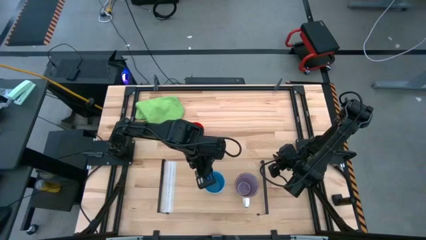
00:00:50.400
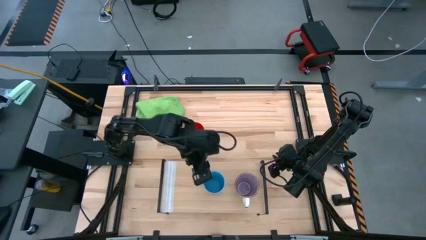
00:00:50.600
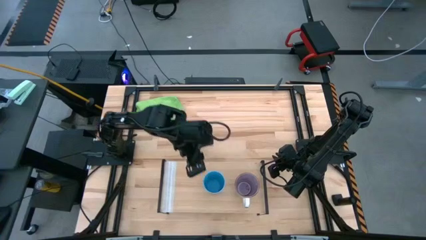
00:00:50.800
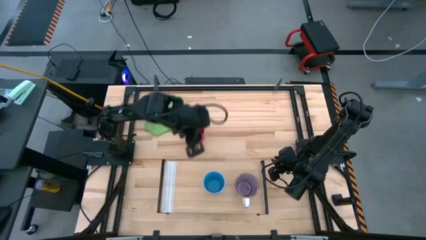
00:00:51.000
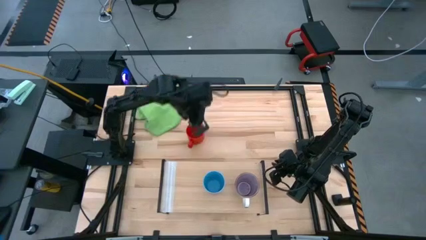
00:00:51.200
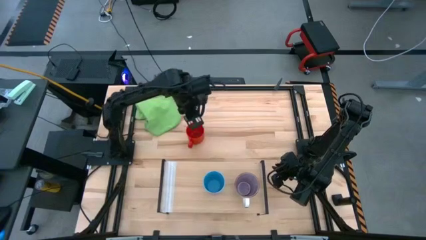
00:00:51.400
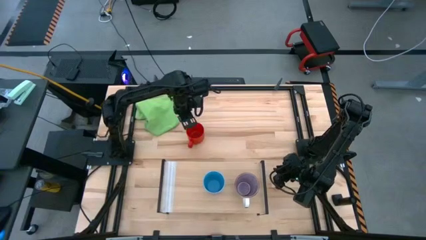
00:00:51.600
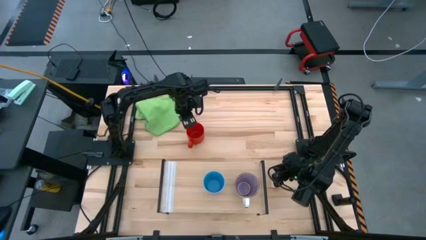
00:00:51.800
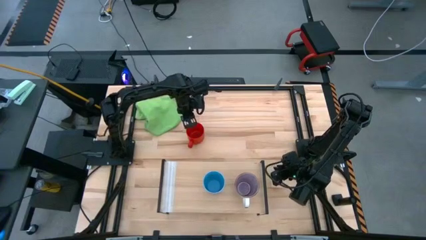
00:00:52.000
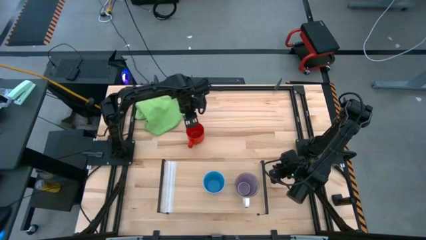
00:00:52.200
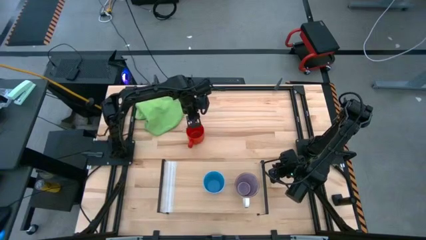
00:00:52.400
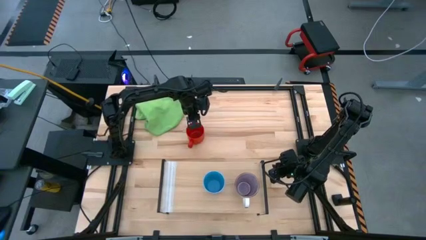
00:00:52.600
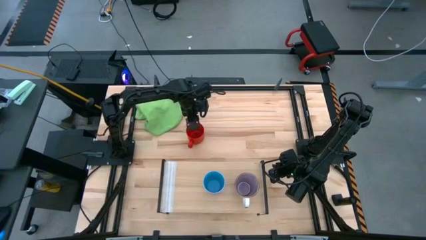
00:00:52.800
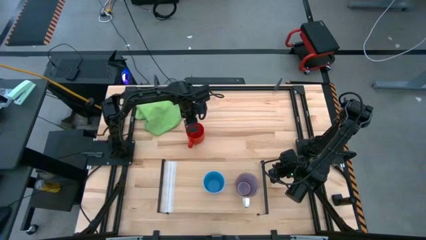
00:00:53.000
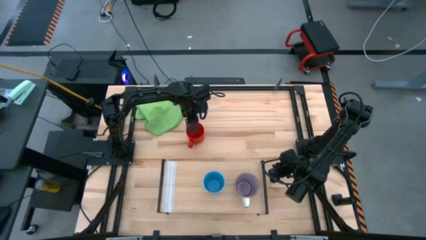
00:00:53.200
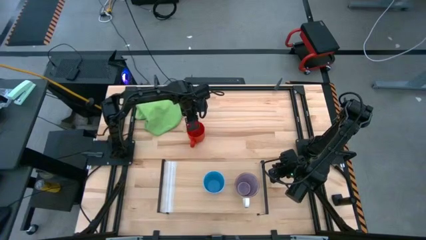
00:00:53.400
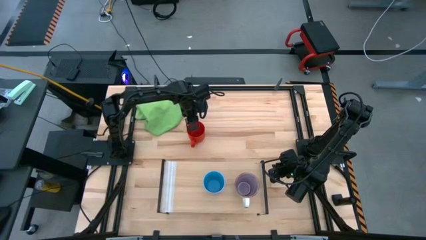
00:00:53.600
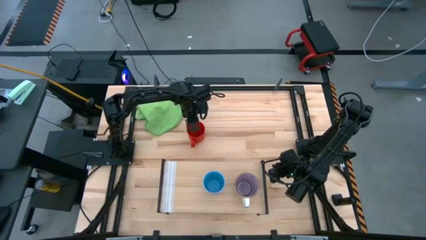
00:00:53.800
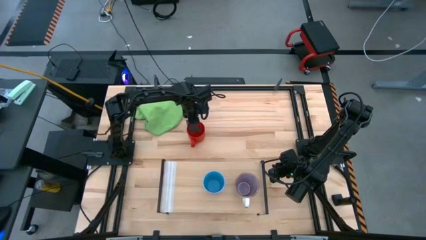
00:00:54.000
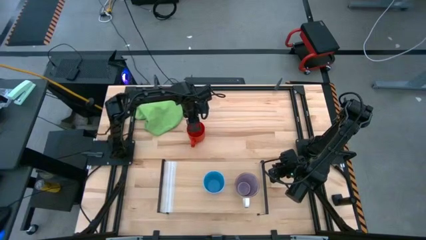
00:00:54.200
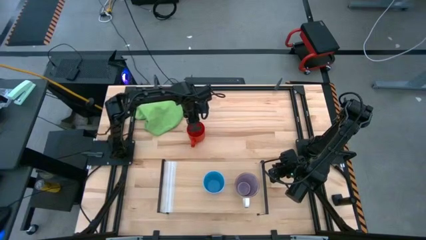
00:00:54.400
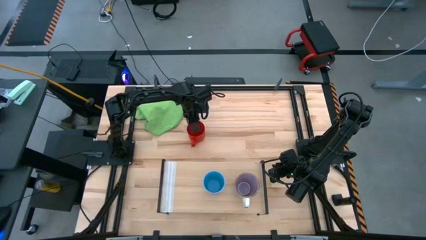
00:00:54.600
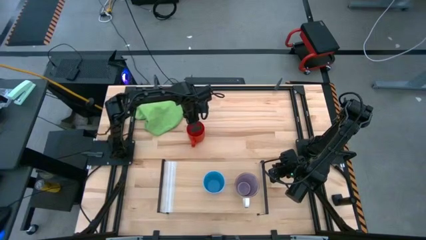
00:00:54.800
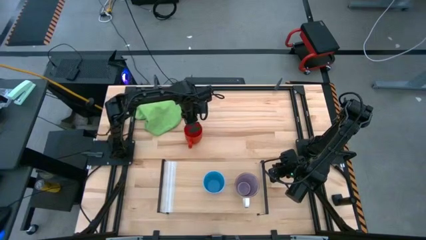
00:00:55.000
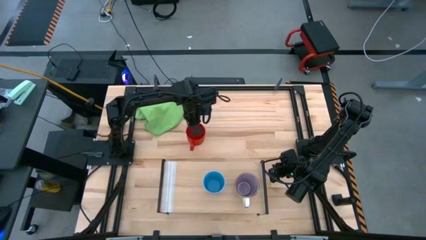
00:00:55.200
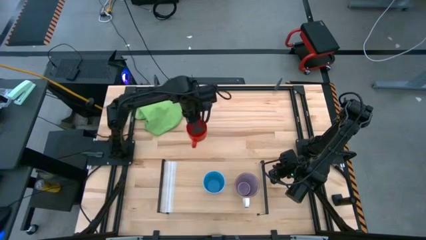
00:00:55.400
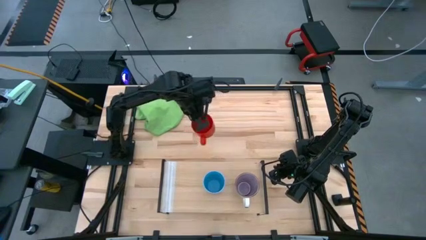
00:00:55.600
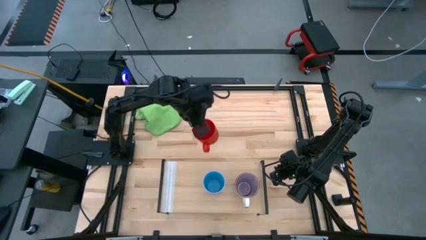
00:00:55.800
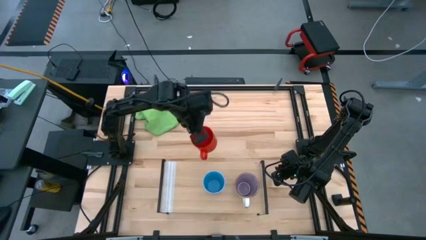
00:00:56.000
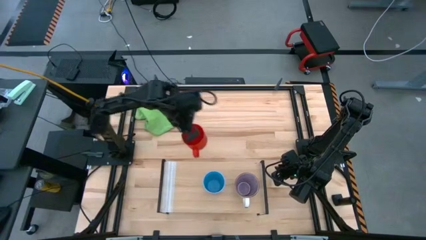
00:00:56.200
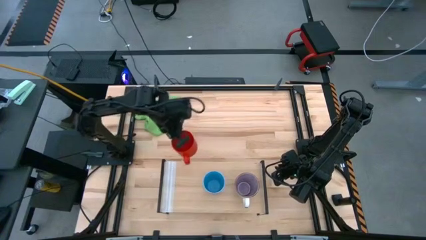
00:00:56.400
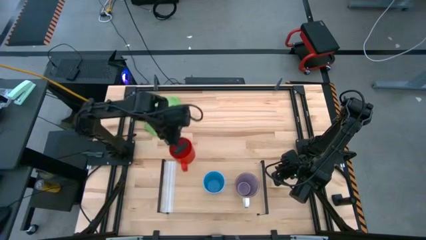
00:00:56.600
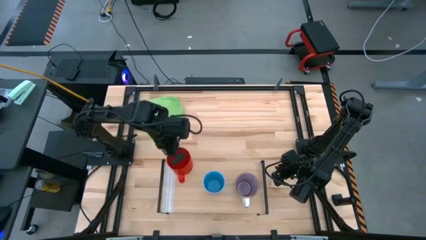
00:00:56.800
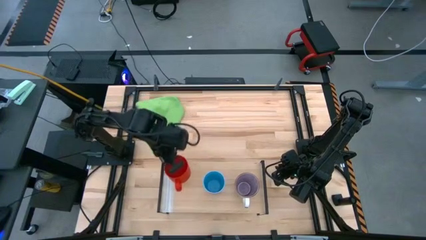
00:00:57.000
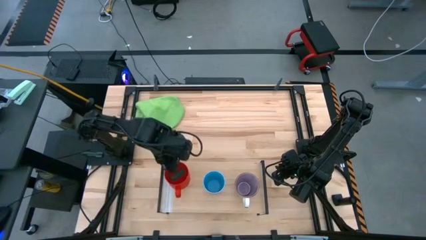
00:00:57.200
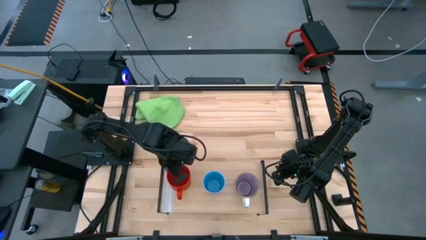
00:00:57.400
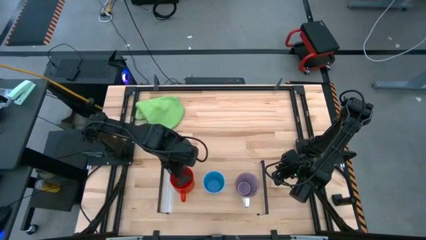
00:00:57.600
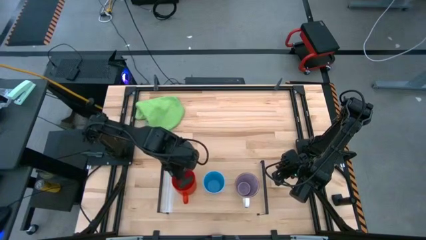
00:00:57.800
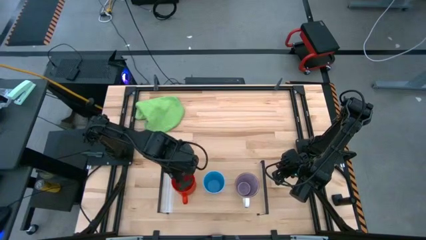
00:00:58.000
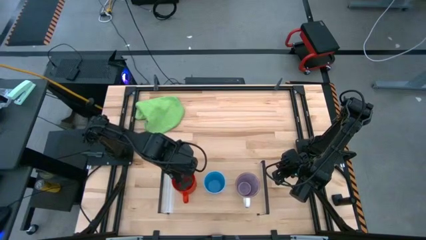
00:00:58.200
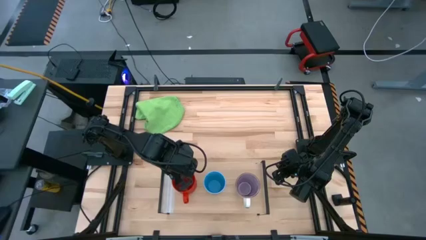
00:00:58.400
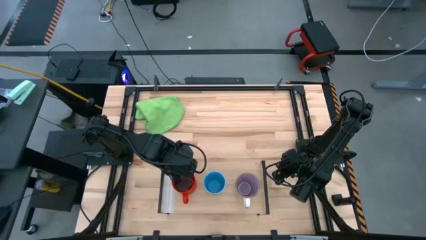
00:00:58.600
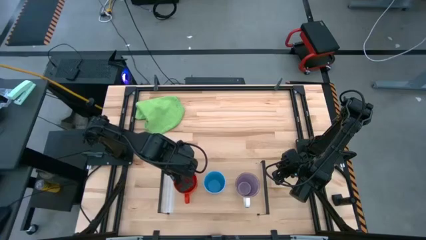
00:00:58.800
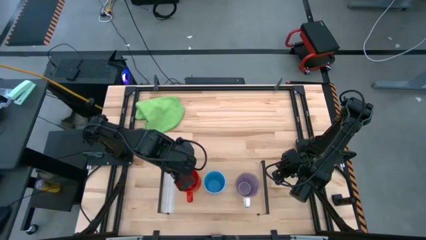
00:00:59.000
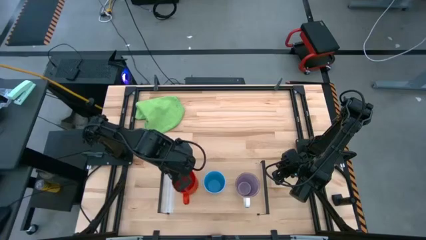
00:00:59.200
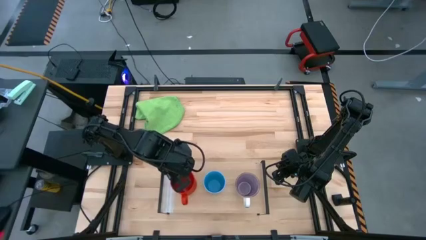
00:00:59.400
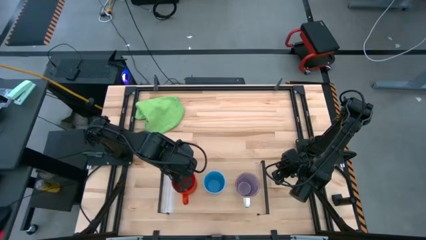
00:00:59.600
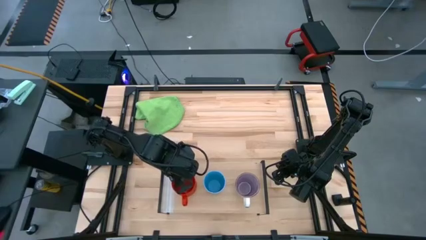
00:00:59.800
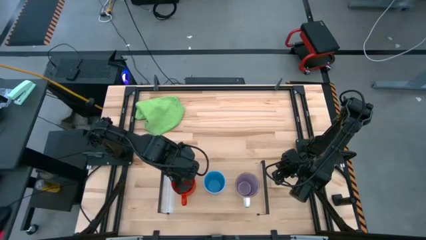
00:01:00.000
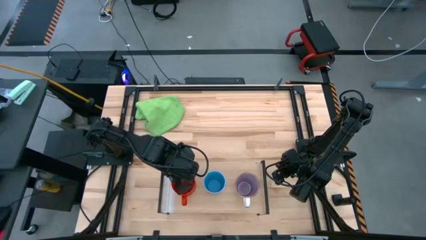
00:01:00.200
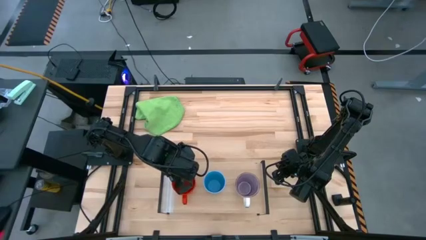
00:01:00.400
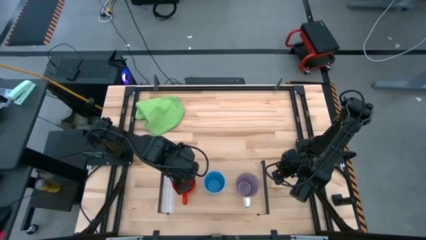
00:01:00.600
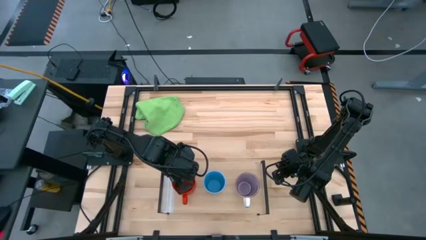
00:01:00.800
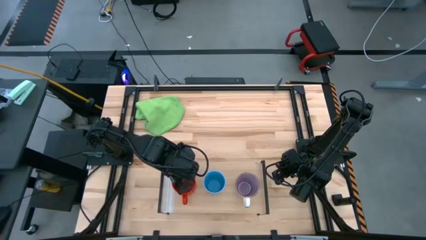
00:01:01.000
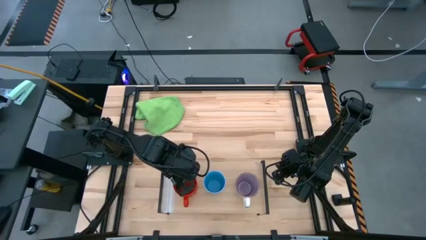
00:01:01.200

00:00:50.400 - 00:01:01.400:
Task: Stack small to large cups/mugs on shelf
Put the orange mug on the shelf

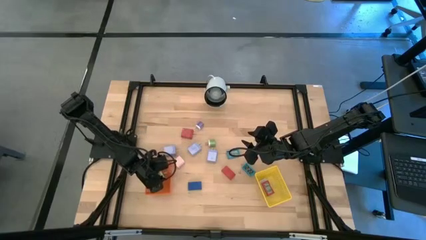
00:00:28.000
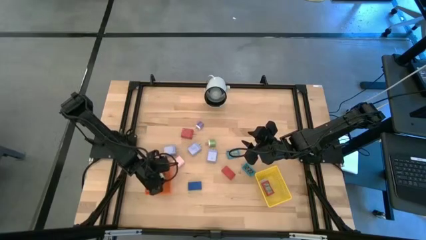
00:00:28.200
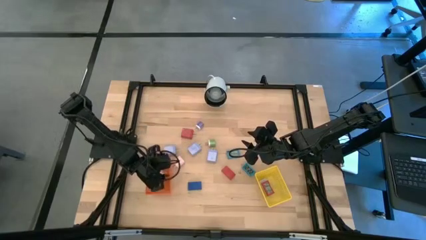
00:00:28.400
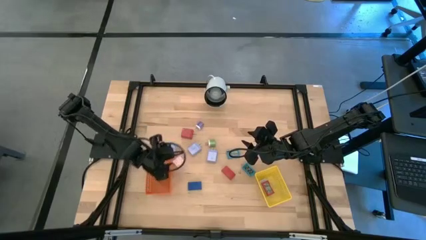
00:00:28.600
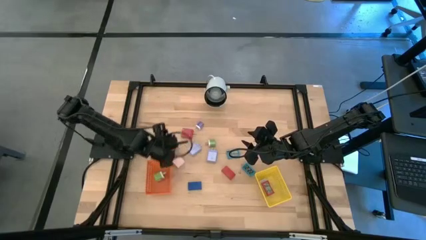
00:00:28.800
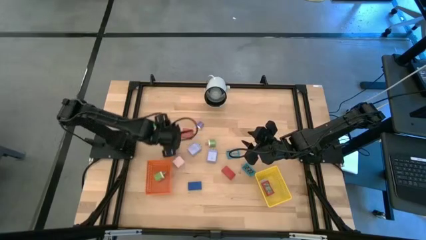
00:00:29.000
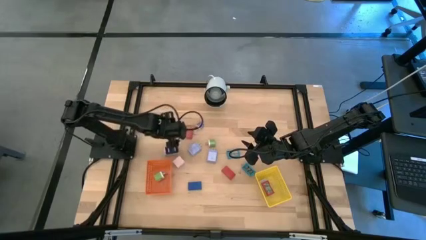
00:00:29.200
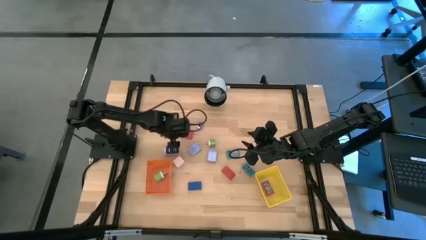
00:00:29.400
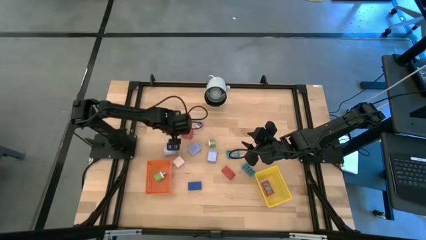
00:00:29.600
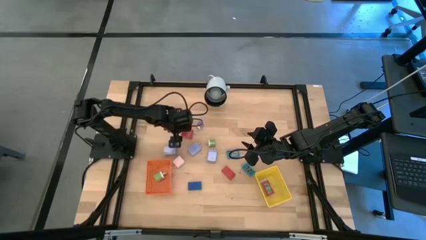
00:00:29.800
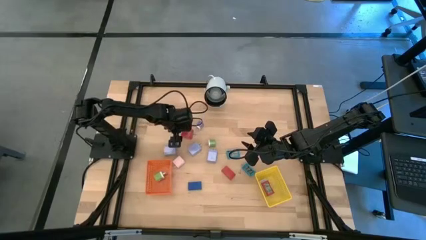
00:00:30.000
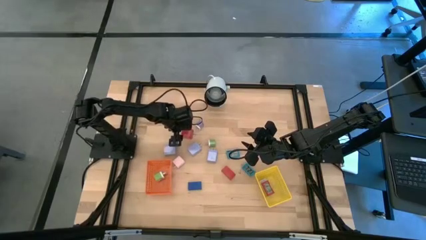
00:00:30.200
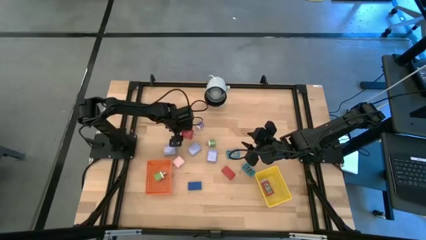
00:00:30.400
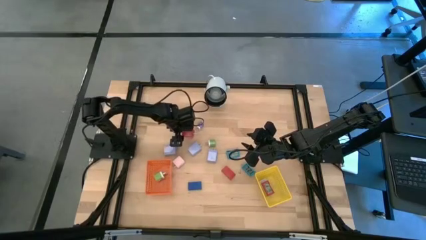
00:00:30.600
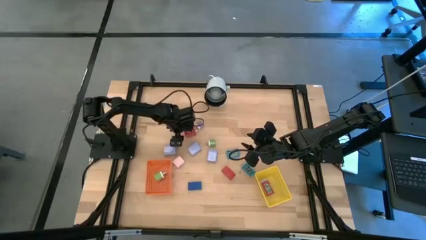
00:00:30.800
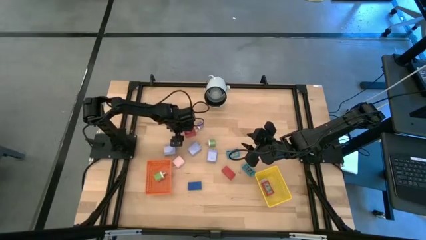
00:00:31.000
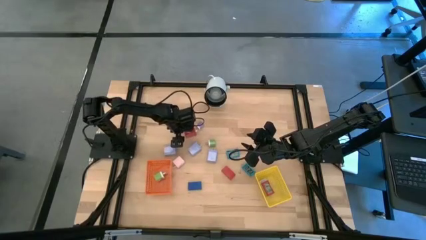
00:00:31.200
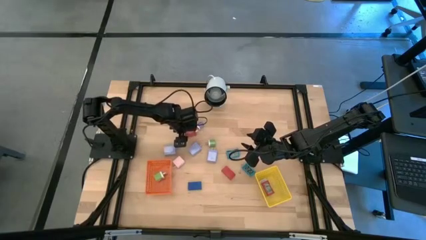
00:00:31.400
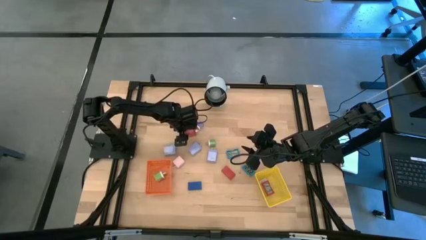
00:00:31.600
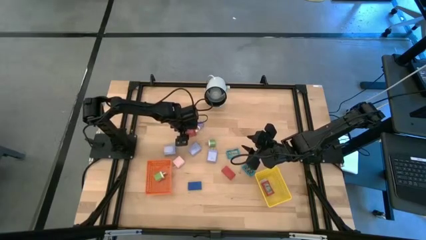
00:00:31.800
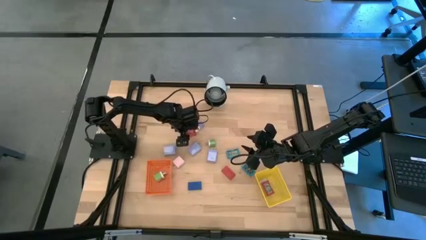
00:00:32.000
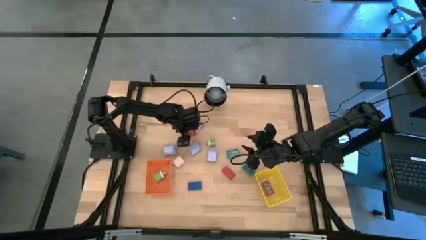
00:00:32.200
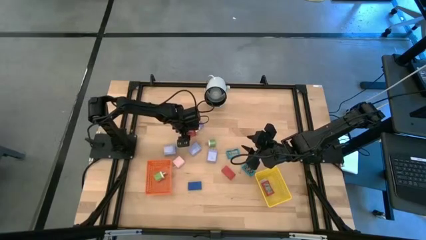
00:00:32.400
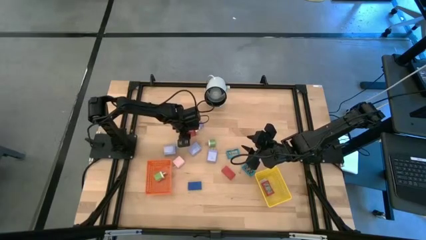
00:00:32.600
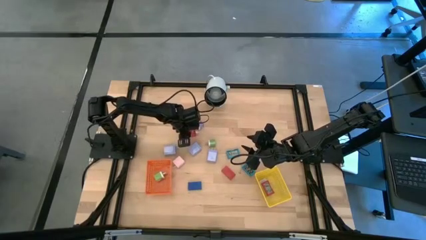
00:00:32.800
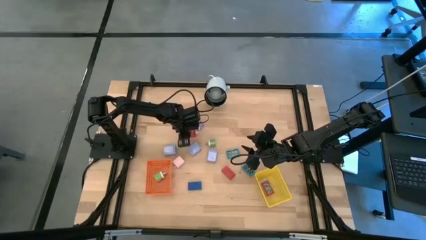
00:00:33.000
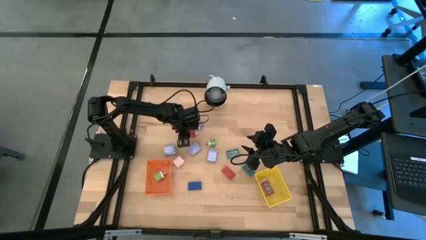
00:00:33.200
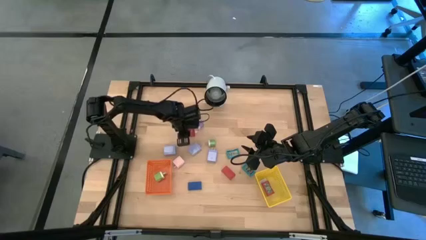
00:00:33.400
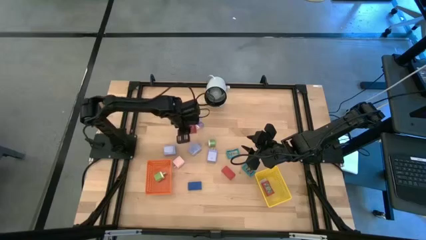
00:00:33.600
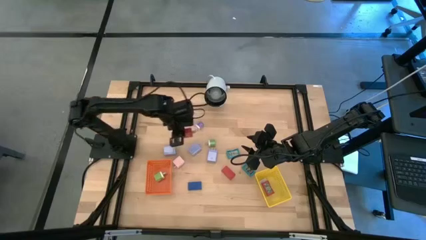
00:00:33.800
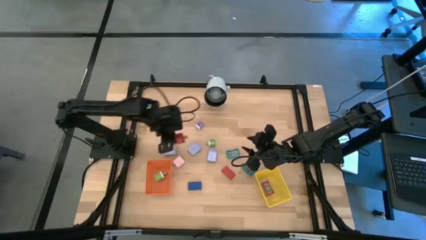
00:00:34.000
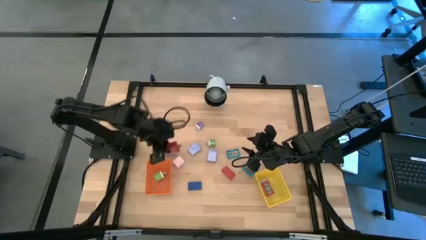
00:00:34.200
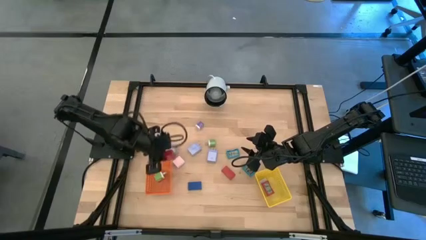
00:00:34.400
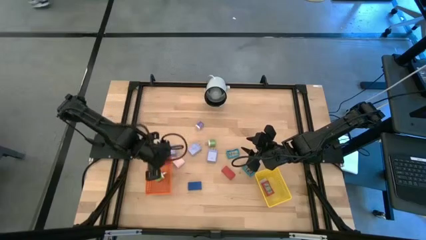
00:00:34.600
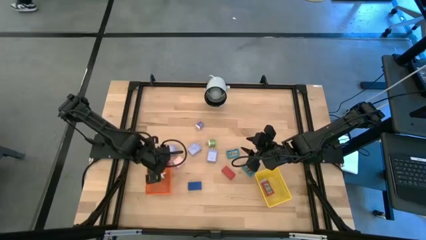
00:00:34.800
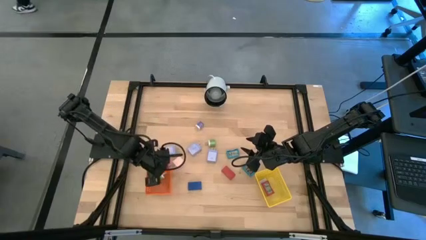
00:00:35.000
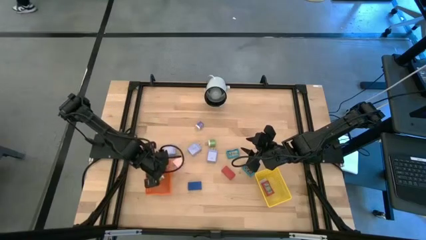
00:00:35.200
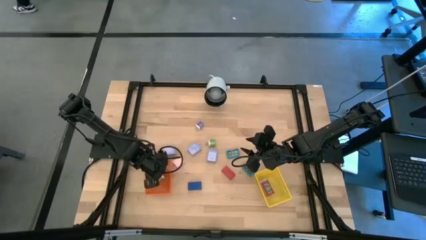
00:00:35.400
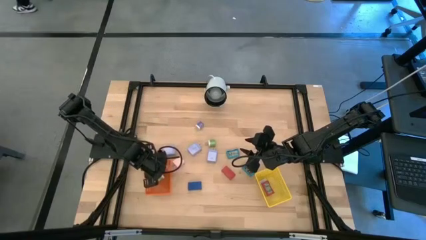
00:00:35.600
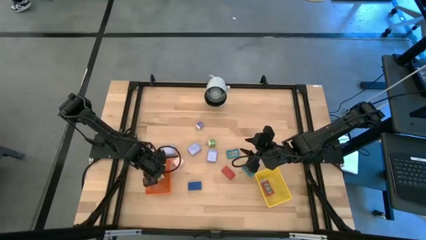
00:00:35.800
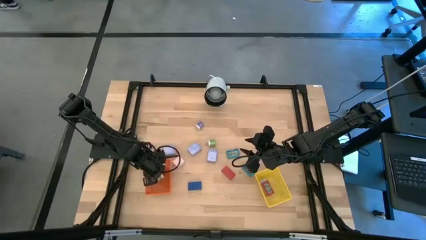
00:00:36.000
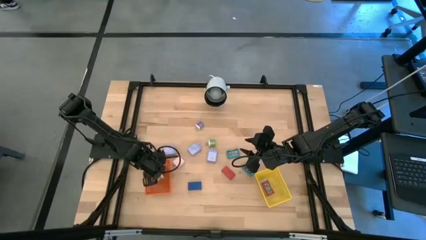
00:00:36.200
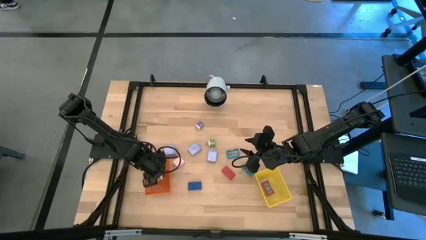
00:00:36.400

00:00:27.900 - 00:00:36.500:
Task: Pick & Place Office items
Put the red charger adapter into the orange basket
